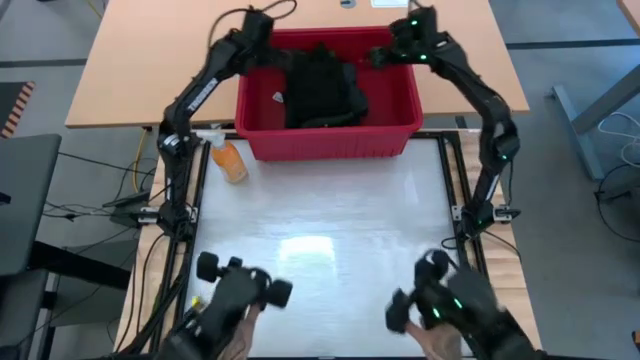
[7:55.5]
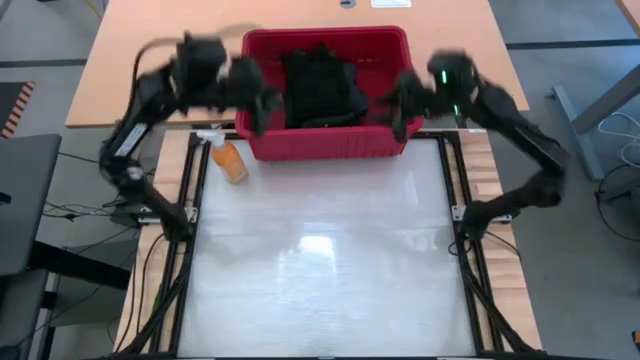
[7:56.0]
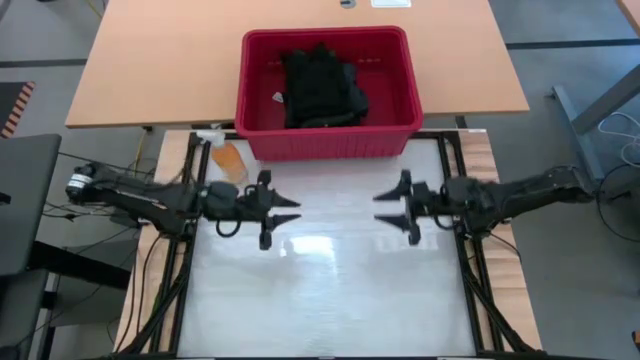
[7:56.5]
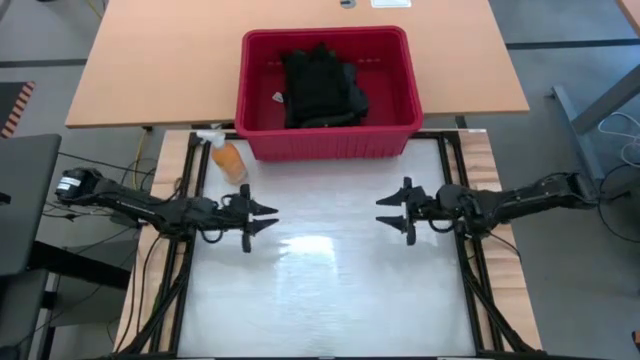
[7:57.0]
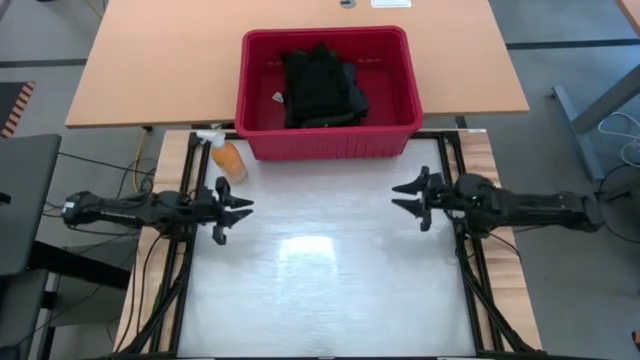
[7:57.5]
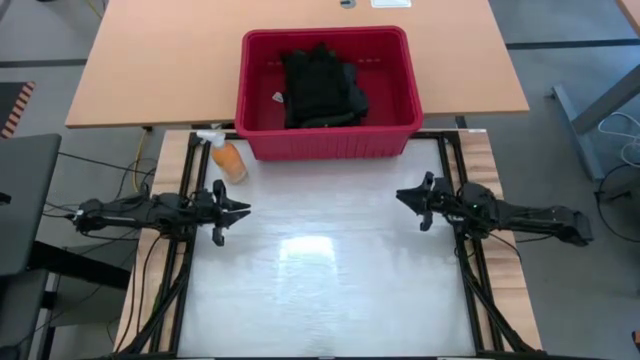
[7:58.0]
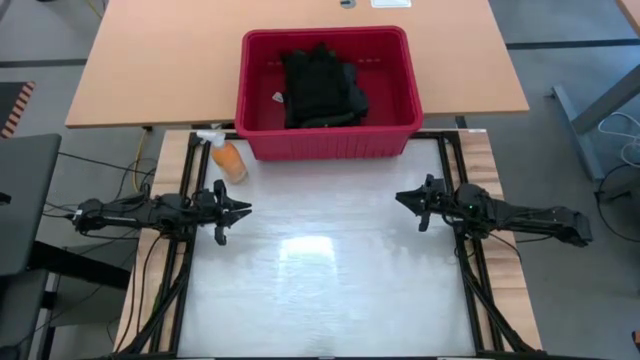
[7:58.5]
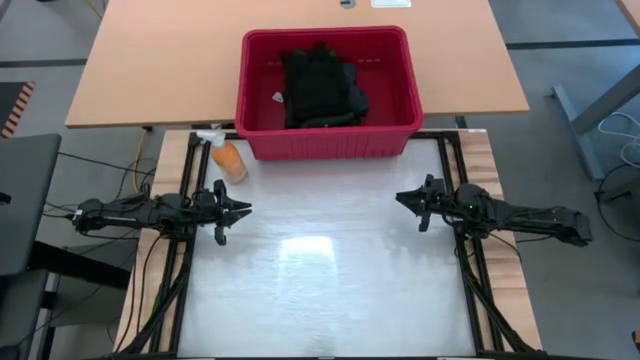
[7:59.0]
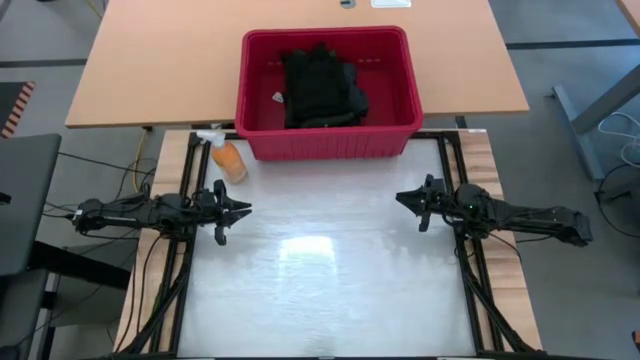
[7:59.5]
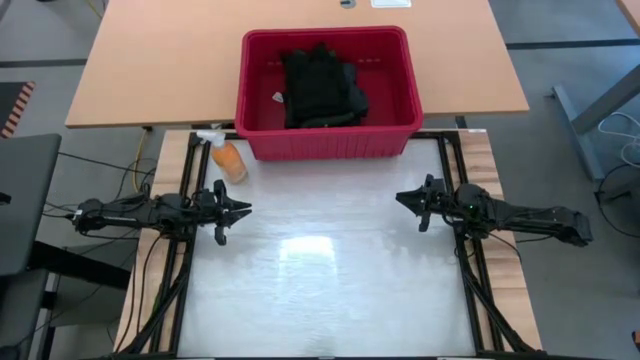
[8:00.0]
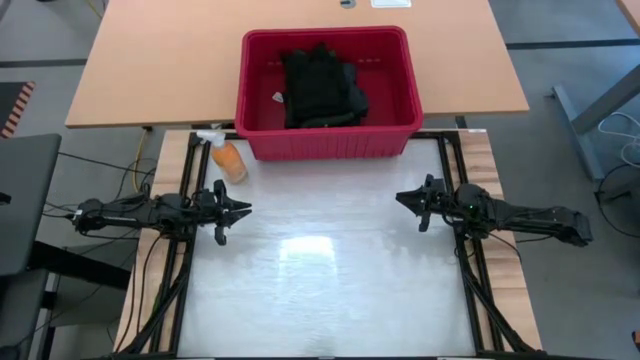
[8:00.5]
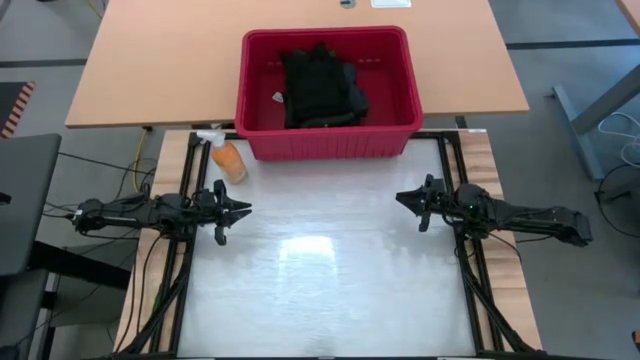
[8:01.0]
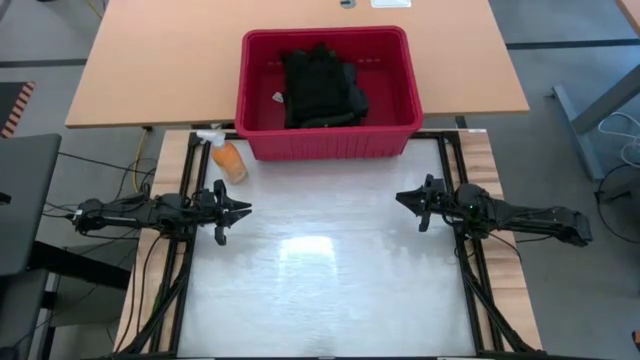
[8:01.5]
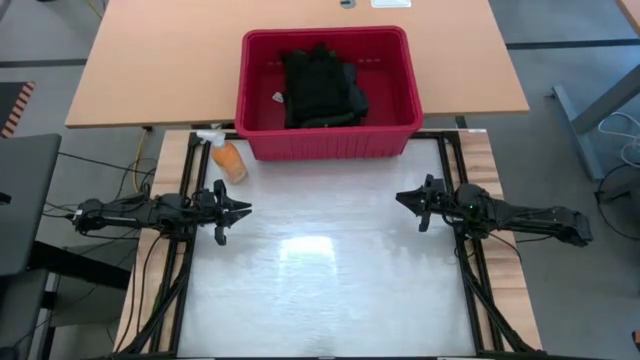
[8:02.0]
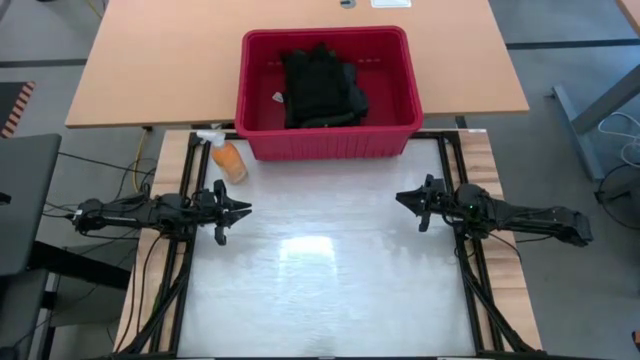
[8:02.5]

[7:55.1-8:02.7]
Task: Fold laundry
Return to Home Position

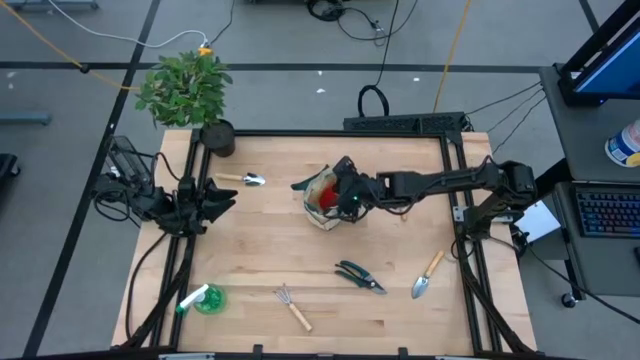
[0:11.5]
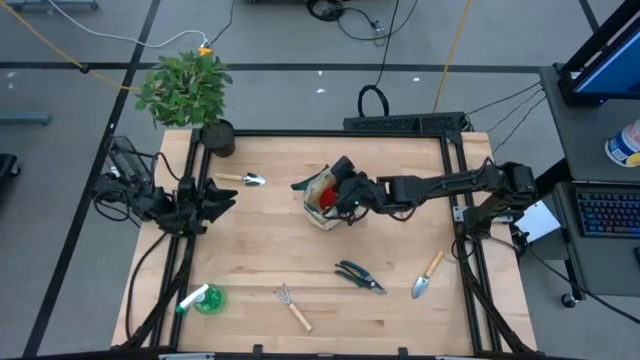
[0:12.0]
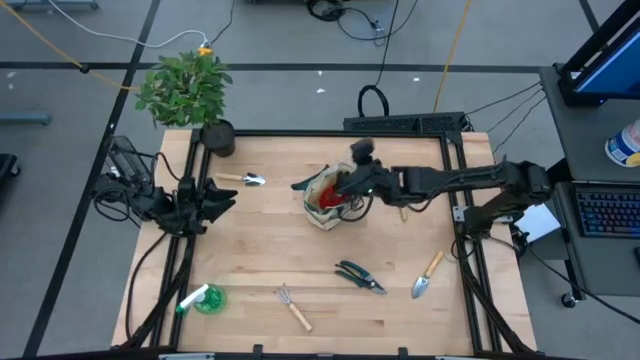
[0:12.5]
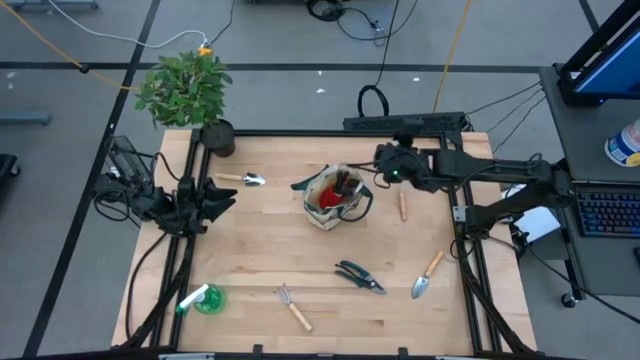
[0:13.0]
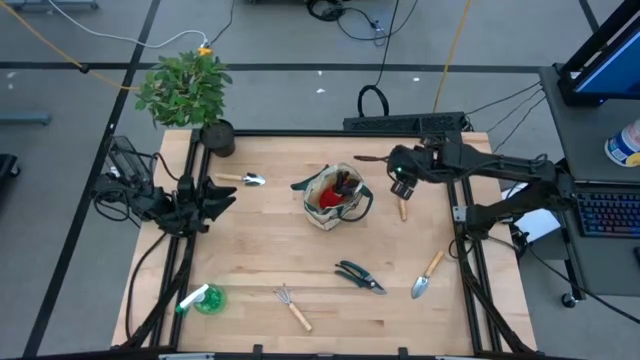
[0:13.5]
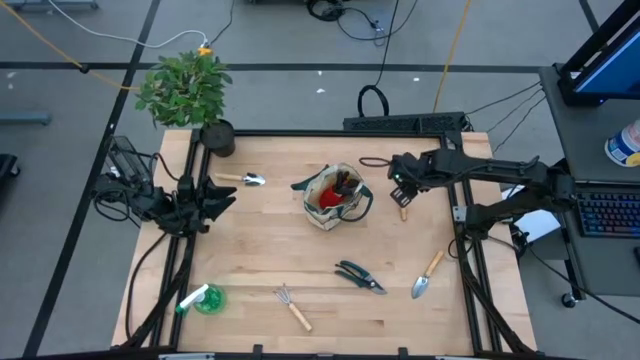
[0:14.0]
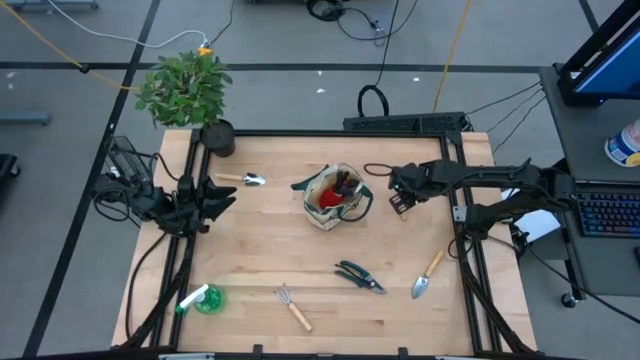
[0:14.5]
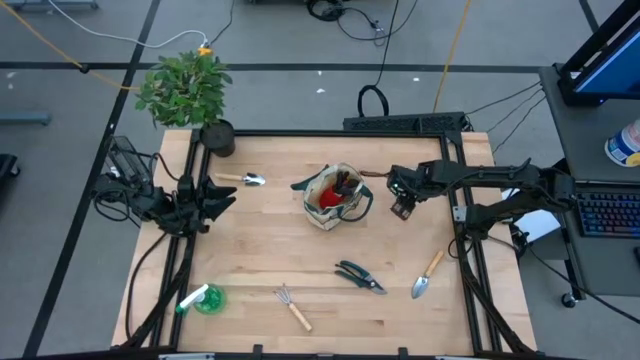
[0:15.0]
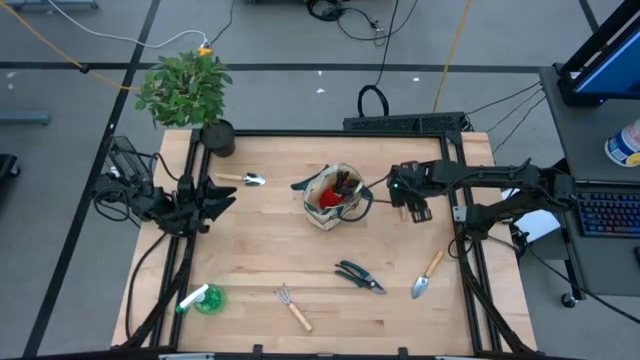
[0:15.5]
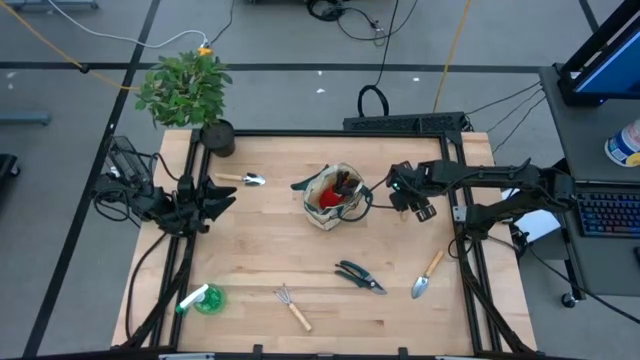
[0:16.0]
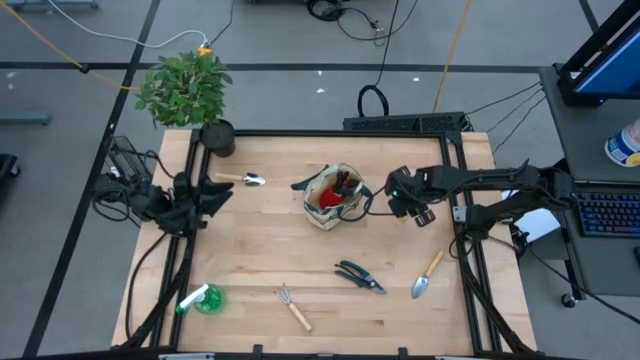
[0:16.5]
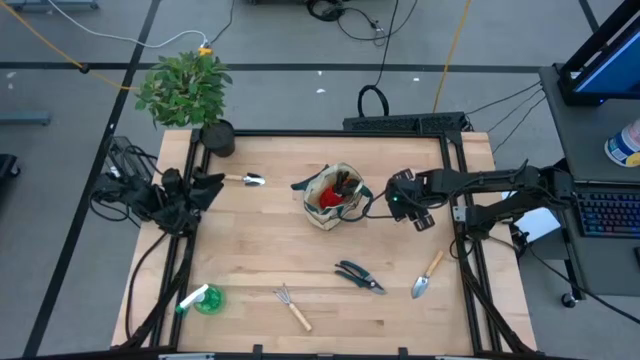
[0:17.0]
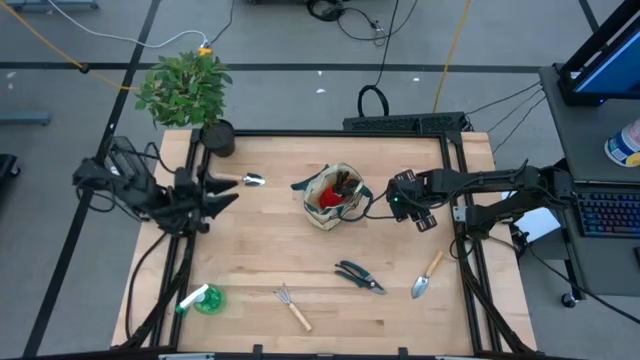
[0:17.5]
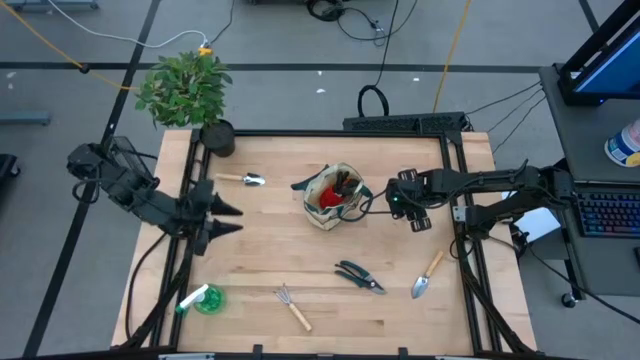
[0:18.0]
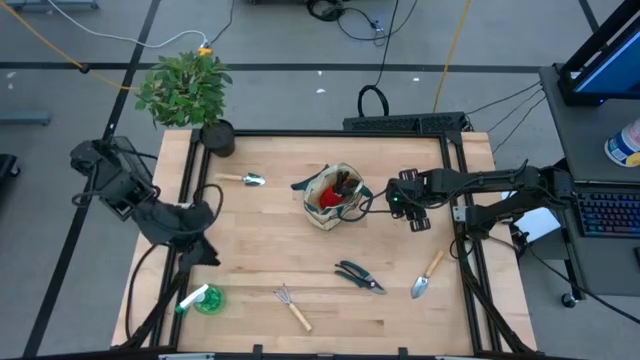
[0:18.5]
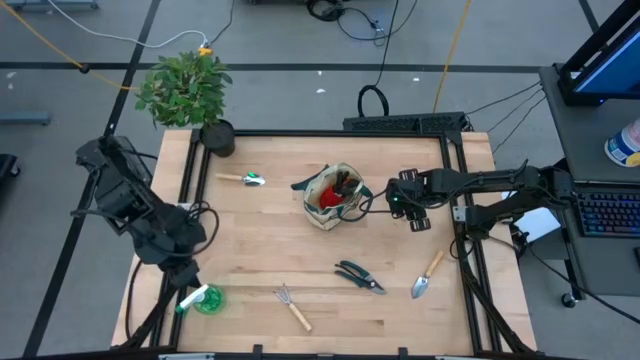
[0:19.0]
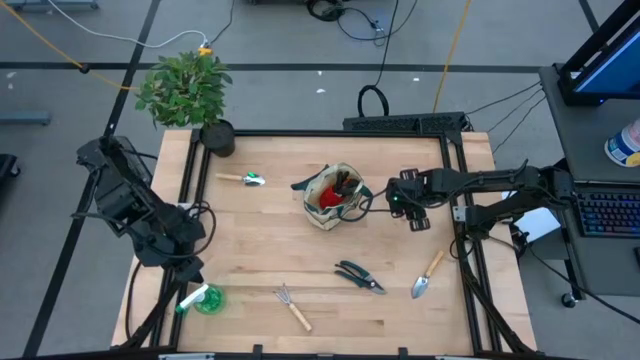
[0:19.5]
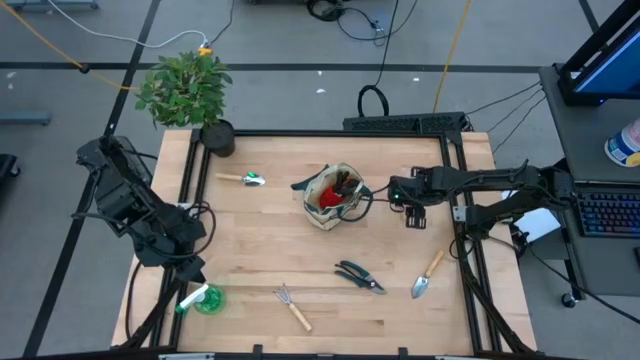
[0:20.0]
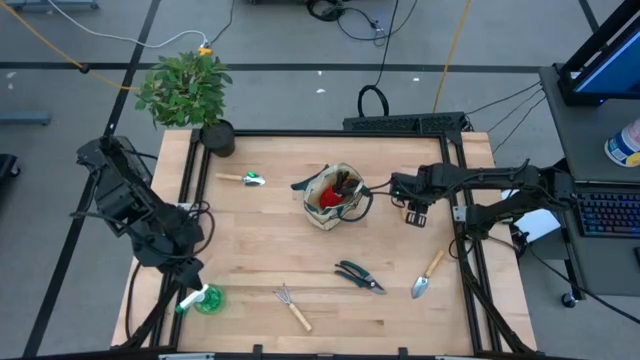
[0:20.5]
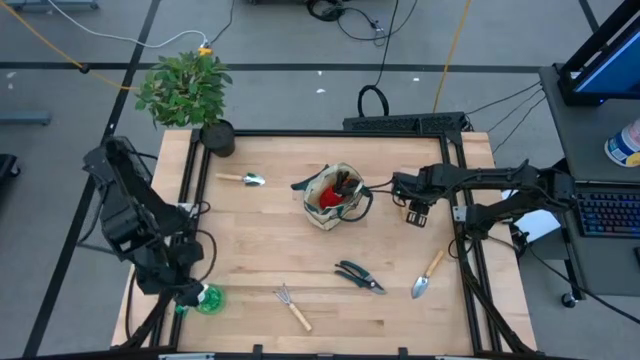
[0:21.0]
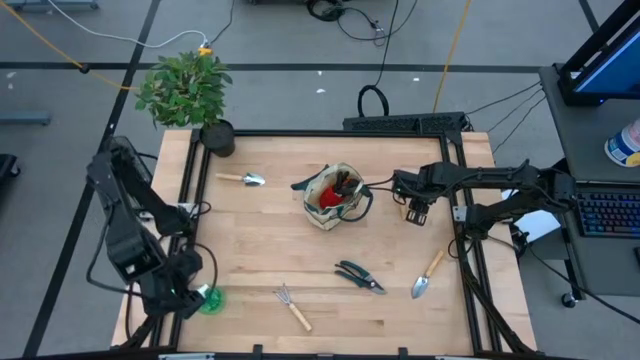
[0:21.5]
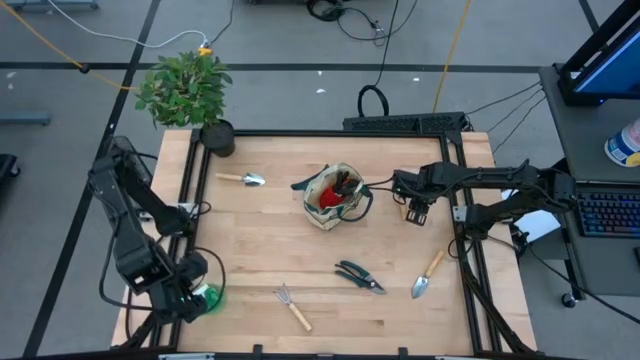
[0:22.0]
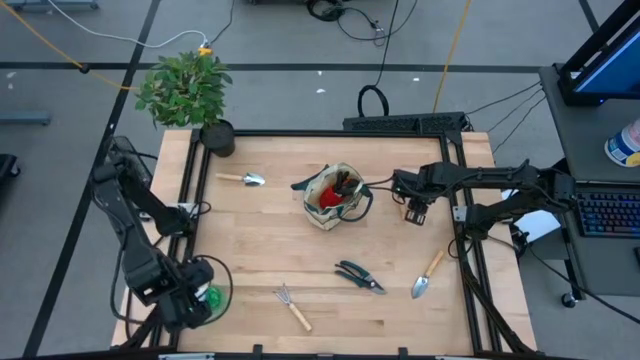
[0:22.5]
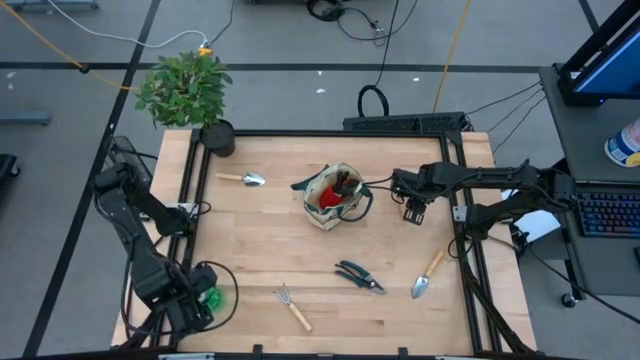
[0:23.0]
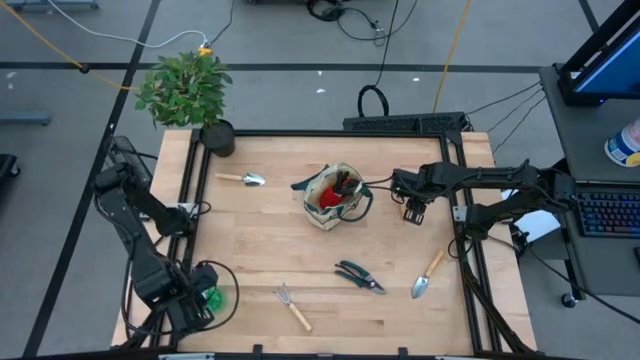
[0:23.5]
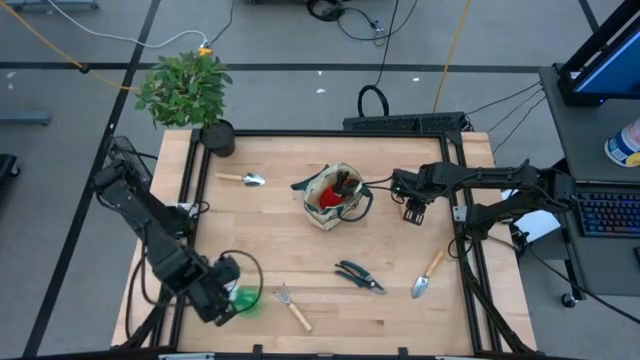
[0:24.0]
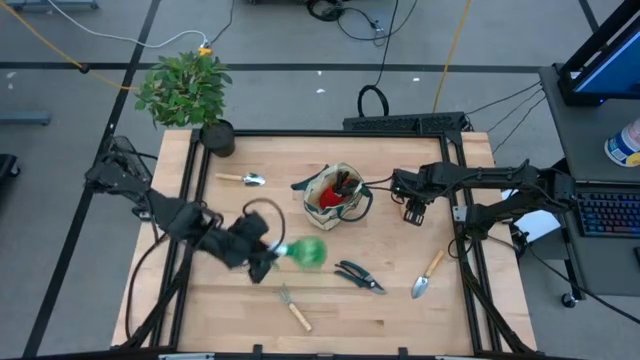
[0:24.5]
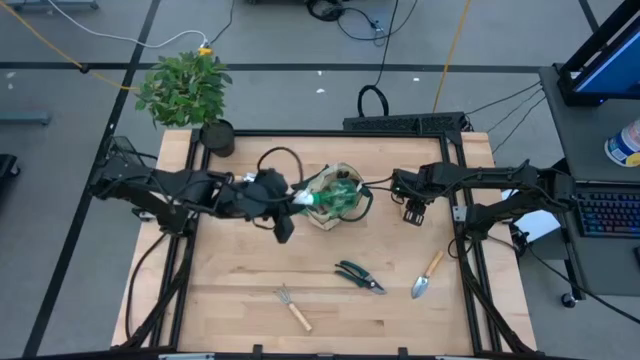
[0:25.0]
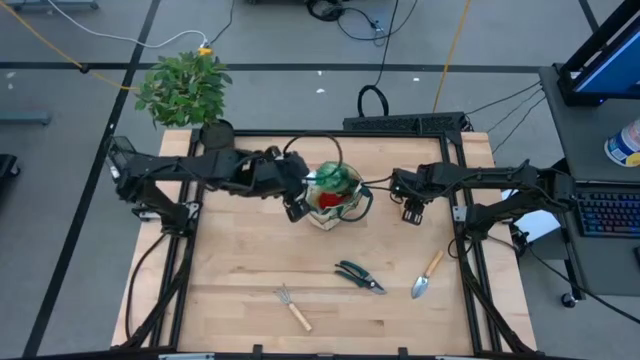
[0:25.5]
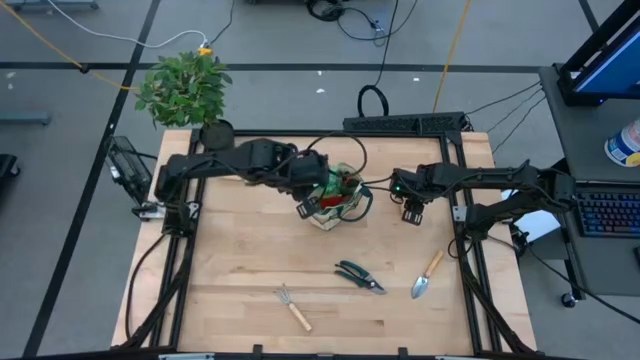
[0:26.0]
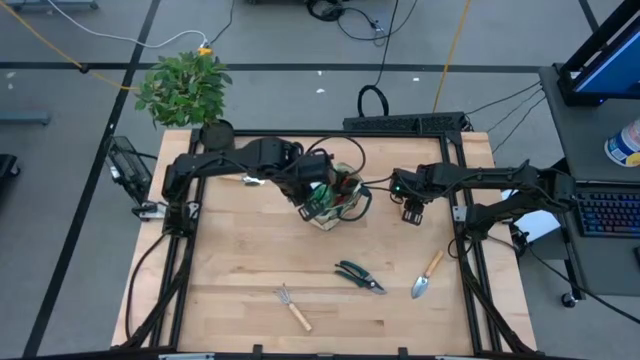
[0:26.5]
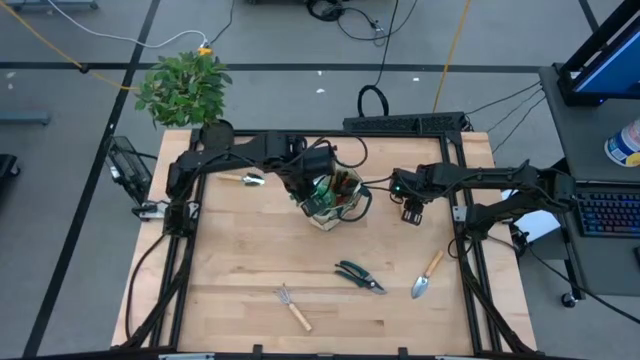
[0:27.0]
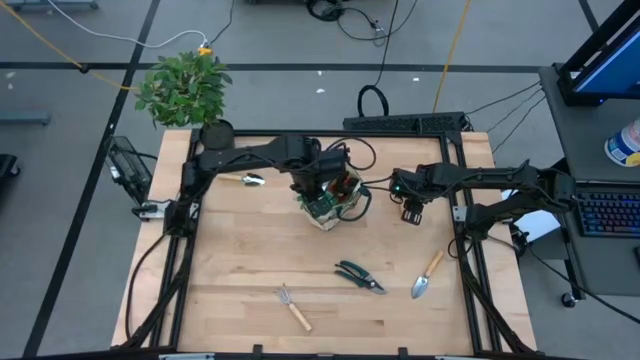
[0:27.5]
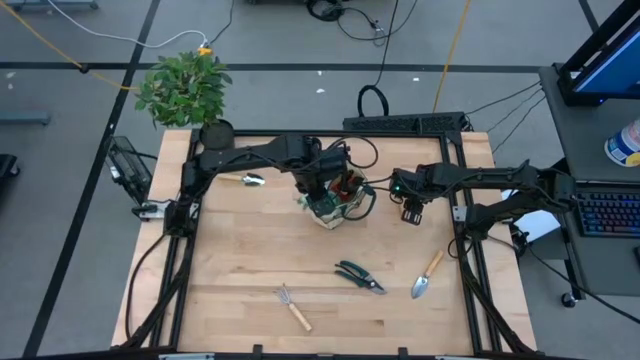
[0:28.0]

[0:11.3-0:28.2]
Task: Pick & Place Garden tools in Gardening bag
Put the green spray bottle into the light brown gardening bag
